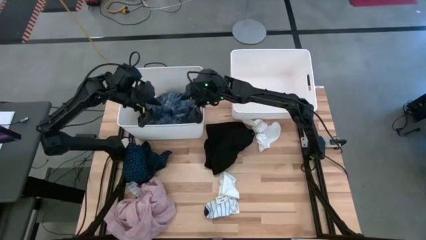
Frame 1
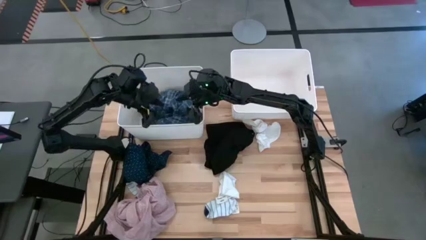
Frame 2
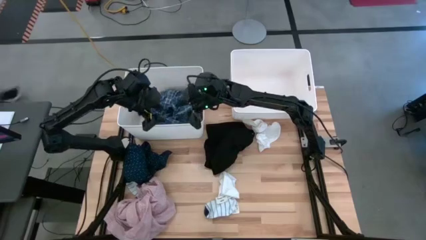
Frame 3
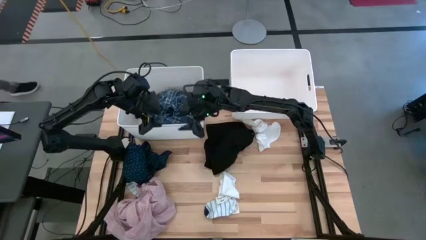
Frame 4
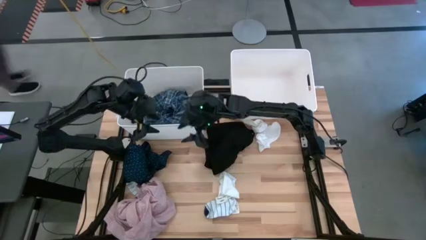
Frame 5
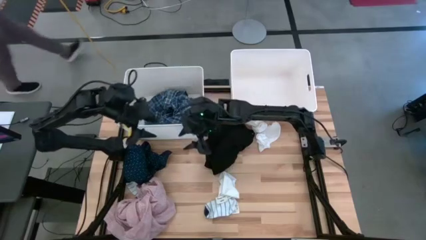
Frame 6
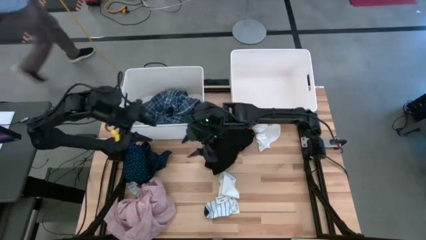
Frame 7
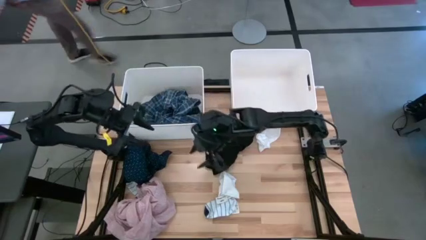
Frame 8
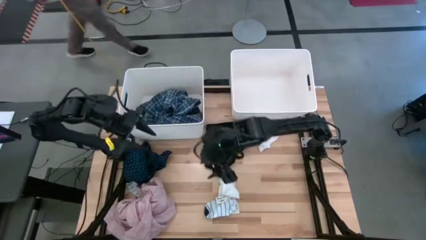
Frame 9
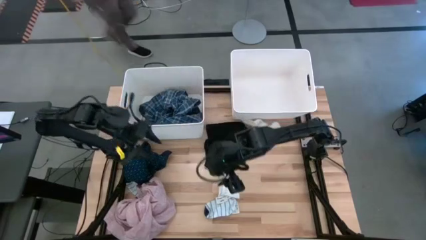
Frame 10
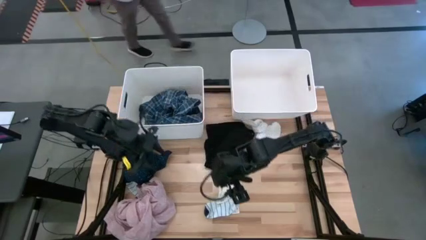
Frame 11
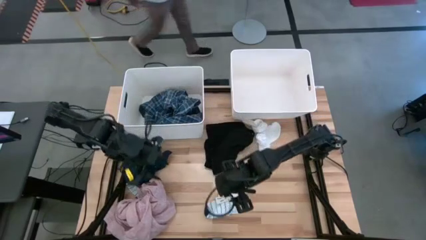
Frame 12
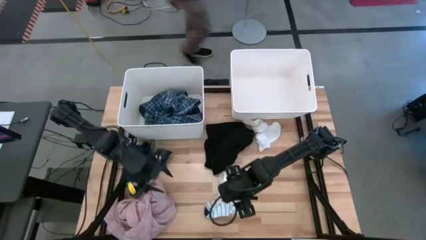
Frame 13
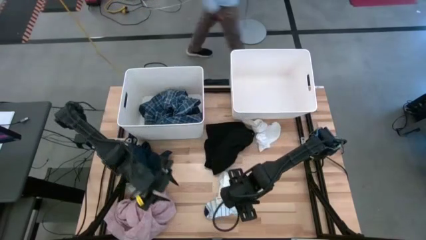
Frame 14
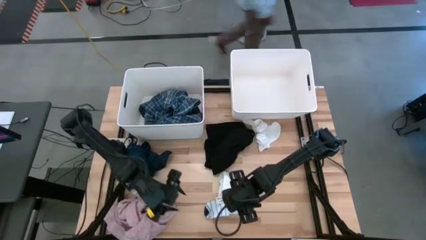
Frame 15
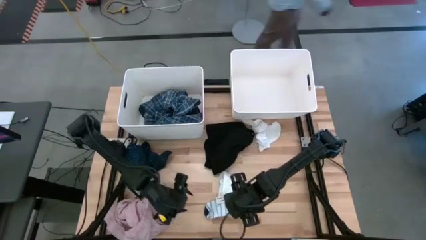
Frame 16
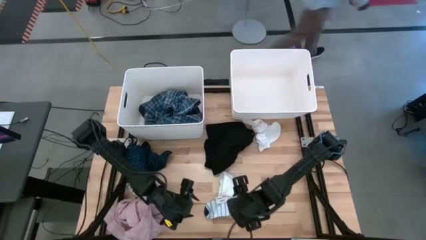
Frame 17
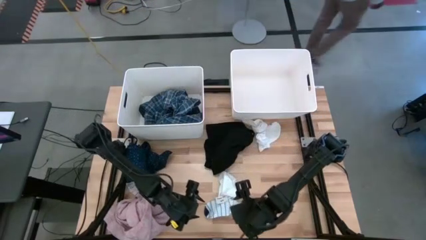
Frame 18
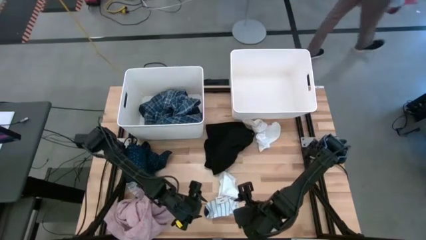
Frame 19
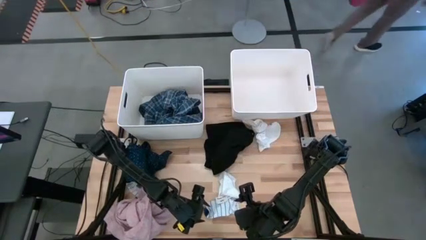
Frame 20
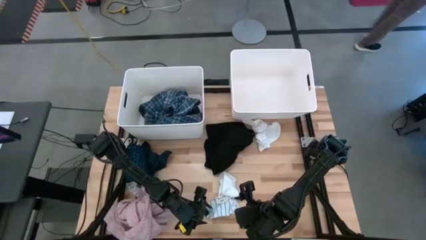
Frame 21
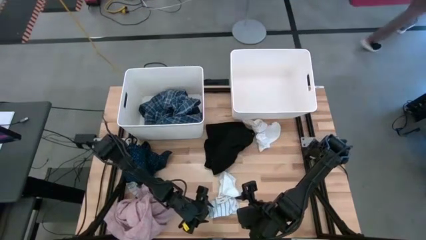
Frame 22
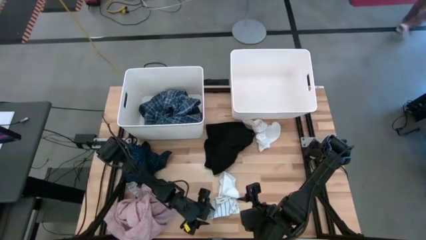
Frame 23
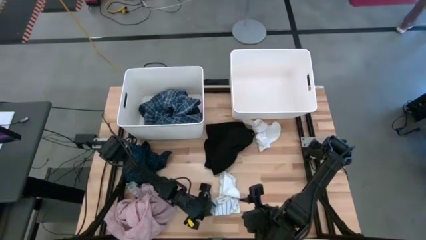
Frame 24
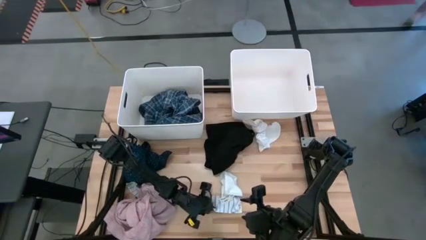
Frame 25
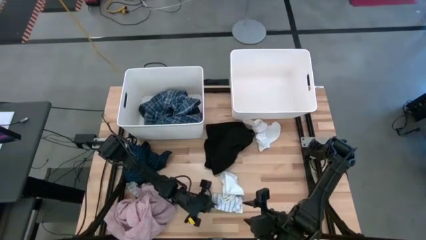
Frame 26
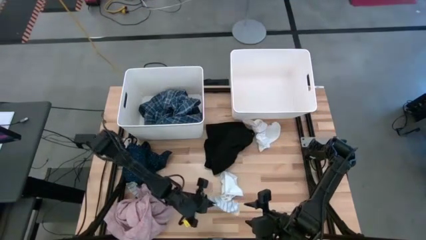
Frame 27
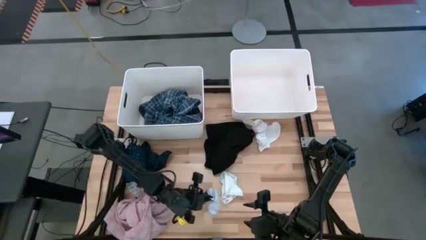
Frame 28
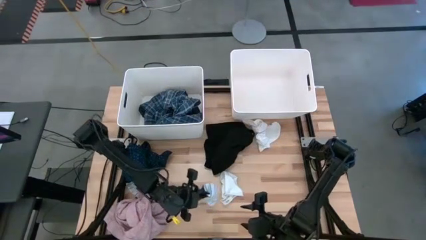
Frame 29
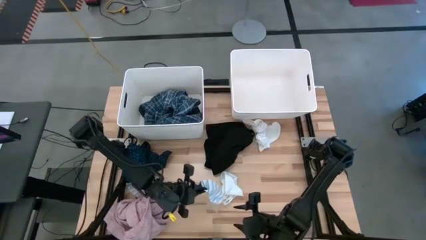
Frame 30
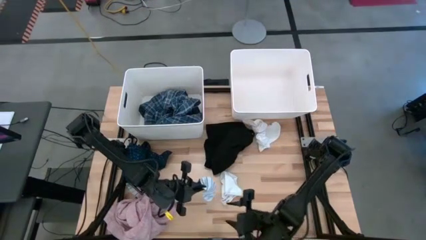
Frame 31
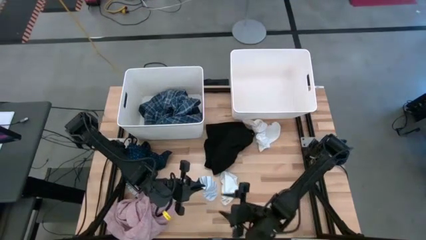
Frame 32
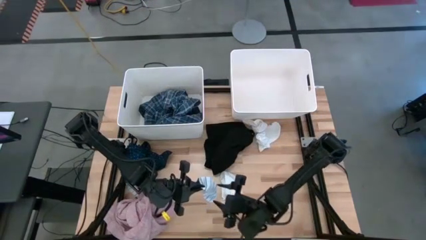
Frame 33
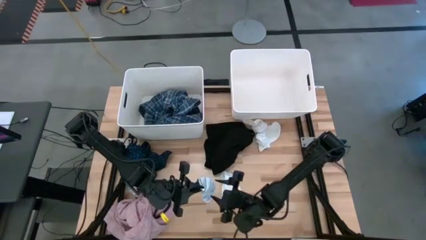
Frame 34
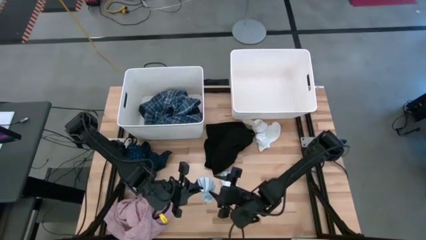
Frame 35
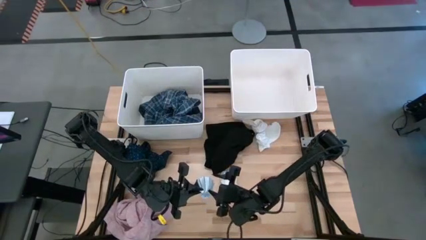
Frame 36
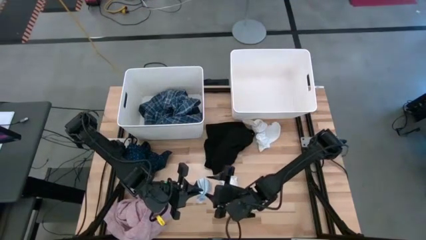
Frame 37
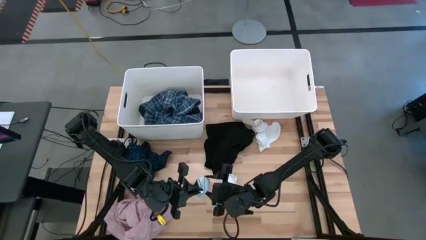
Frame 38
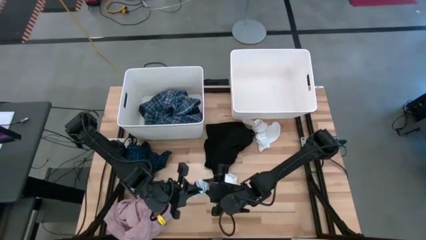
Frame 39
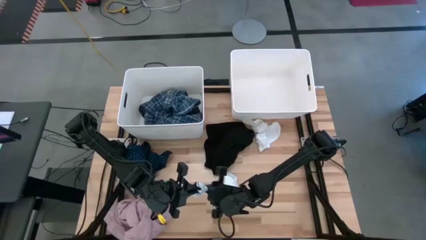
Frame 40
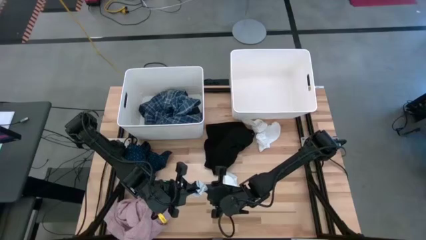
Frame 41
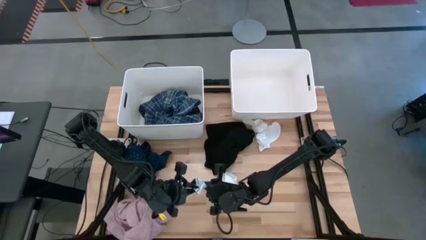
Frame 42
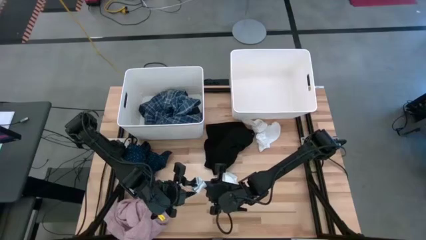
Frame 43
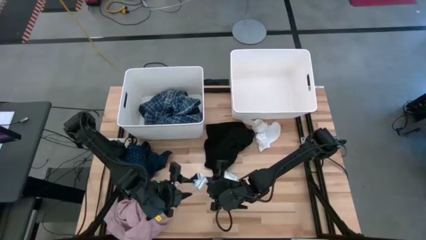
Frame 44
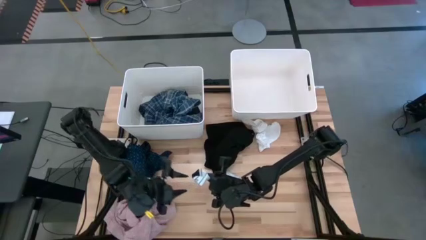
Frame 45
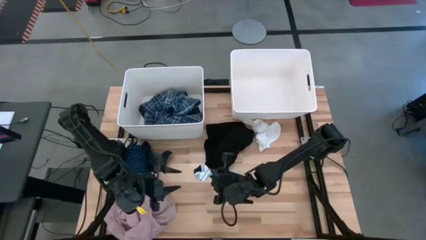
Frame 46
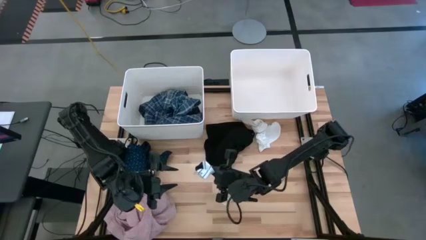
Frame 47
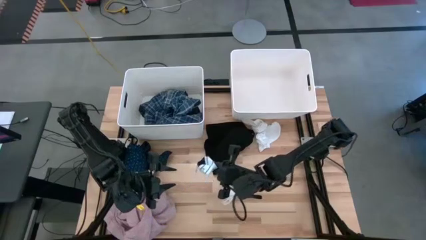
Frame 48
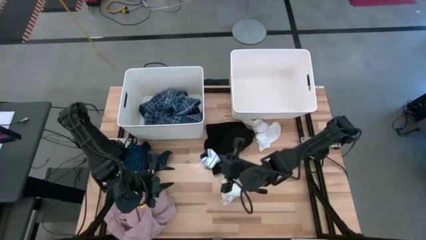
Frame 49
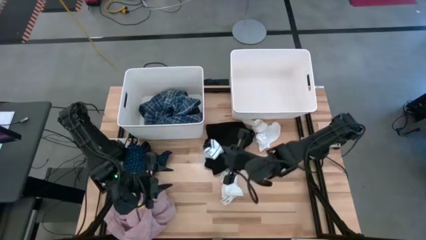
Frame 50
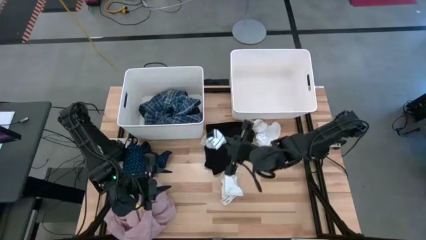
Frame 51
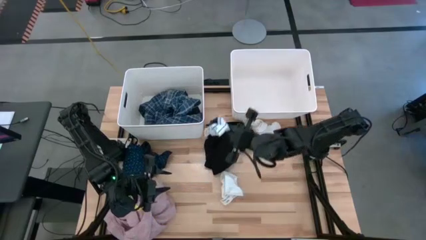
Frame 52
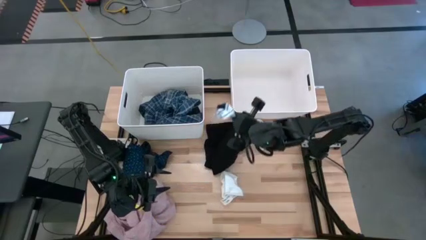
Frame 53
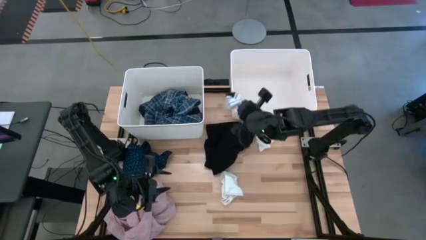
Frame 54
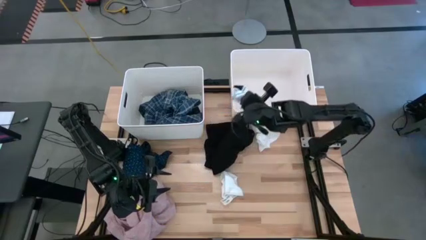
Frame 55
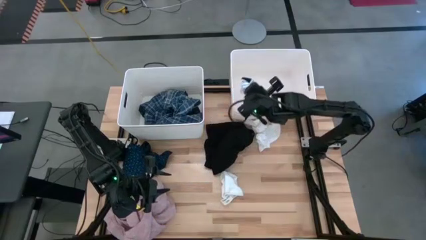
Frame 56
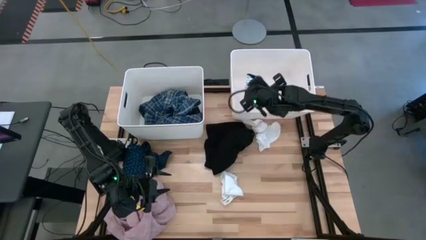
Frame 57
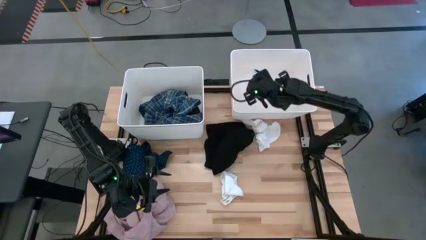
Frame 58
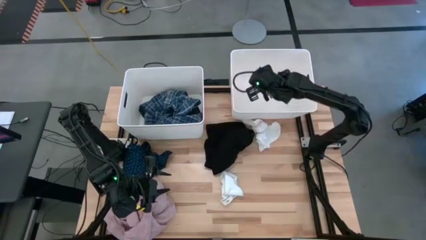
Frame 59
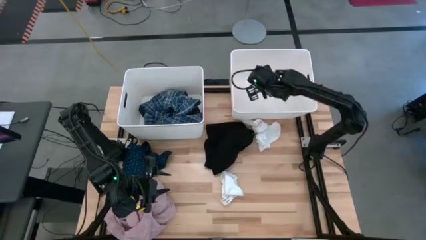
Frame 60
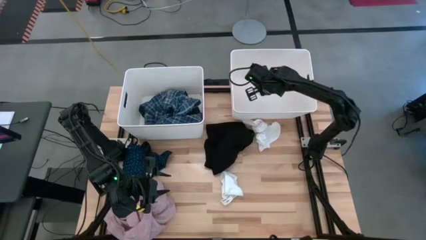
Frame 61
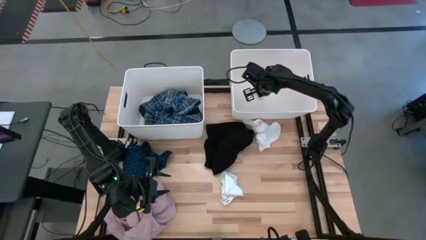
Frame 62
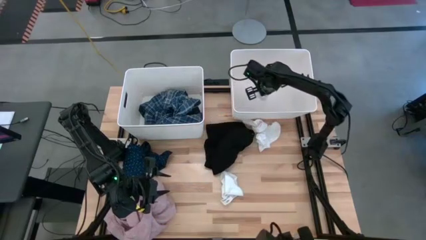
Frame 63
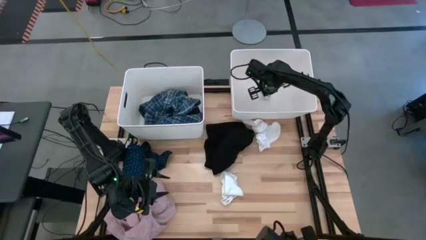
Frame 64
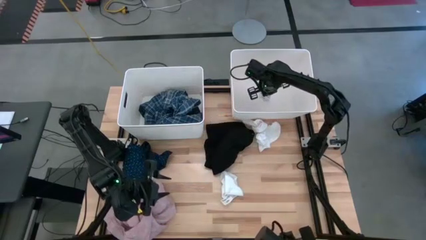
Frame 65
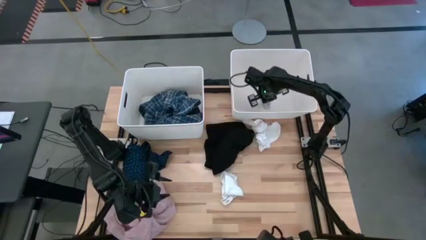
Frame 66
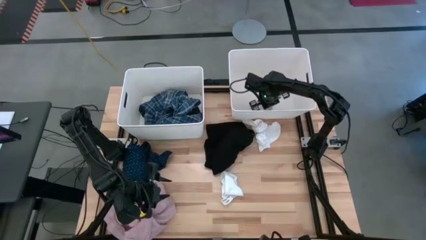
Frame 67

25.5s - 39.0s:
Task: Sort clothes
Put the white patterned sock into the right laundry bin
